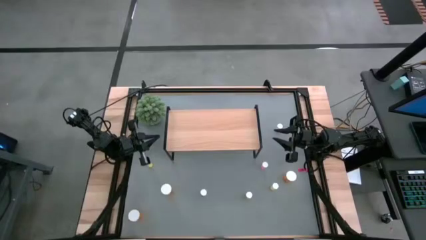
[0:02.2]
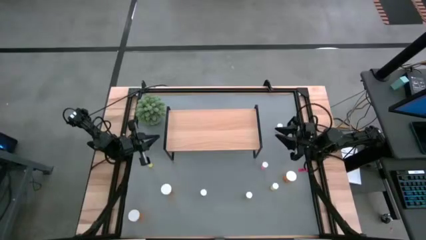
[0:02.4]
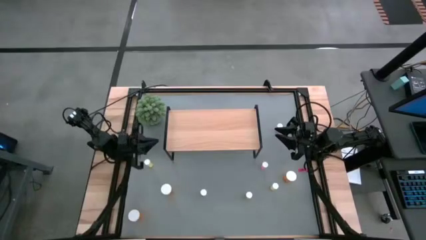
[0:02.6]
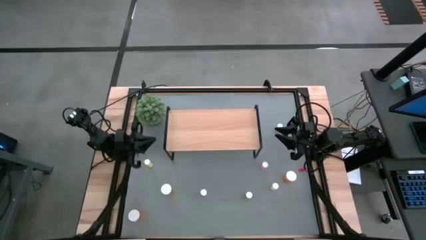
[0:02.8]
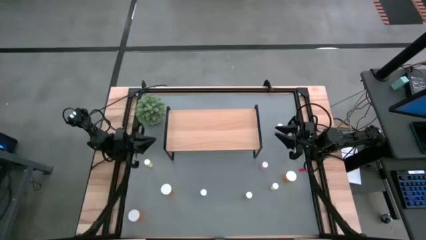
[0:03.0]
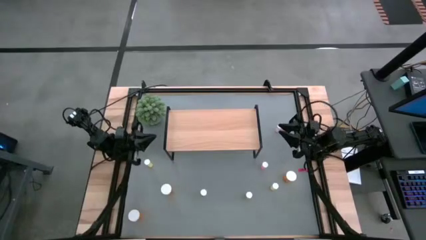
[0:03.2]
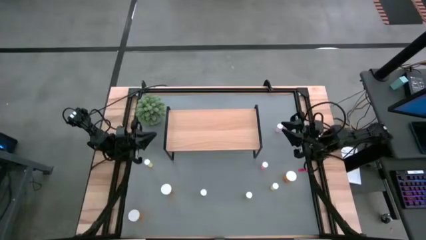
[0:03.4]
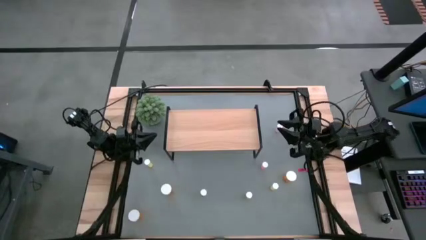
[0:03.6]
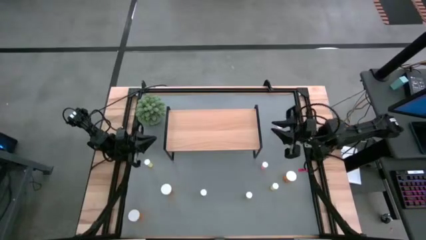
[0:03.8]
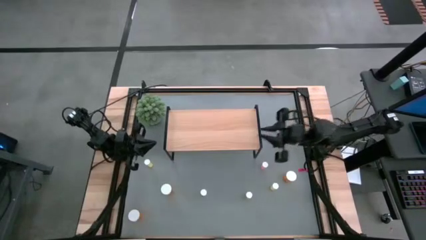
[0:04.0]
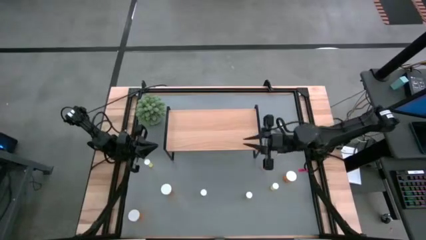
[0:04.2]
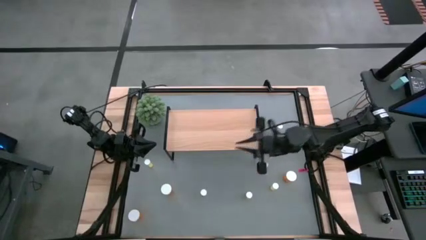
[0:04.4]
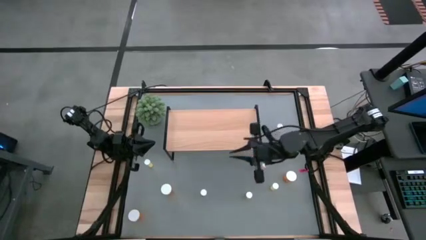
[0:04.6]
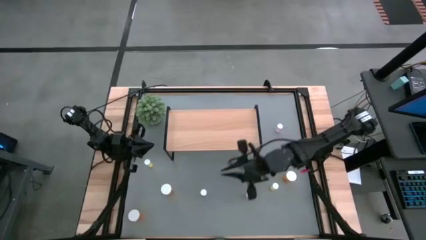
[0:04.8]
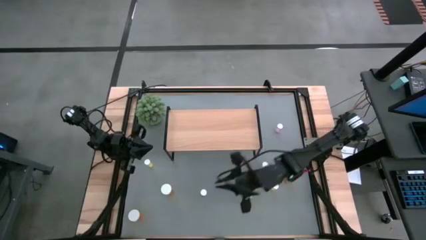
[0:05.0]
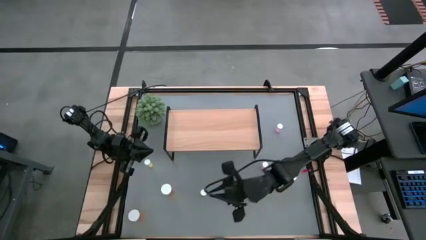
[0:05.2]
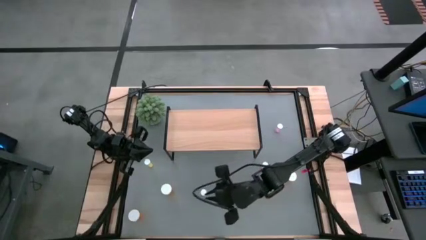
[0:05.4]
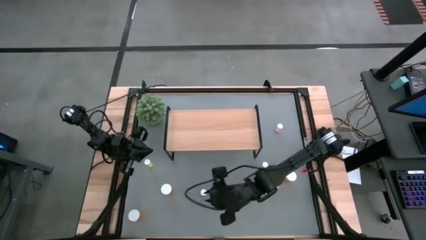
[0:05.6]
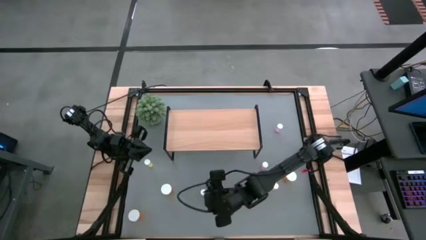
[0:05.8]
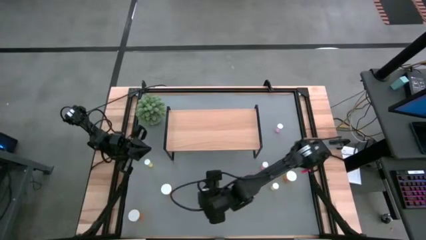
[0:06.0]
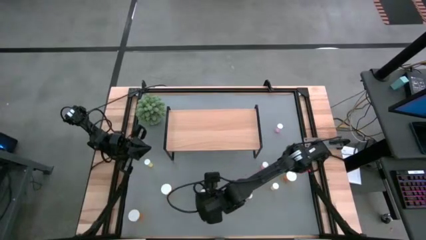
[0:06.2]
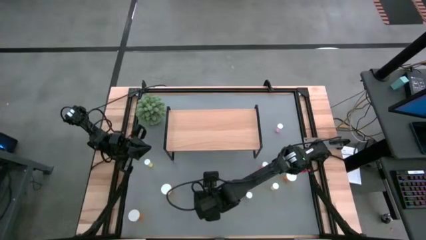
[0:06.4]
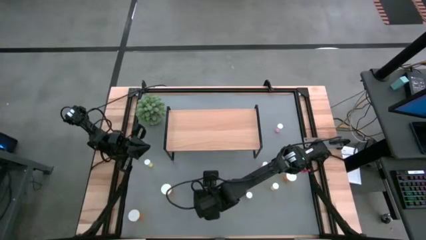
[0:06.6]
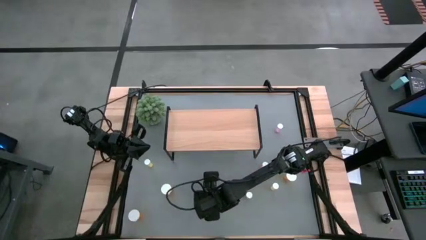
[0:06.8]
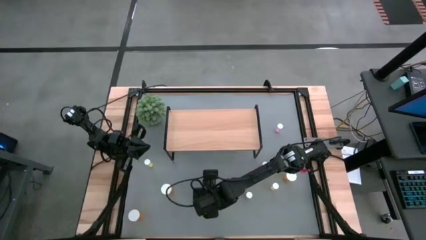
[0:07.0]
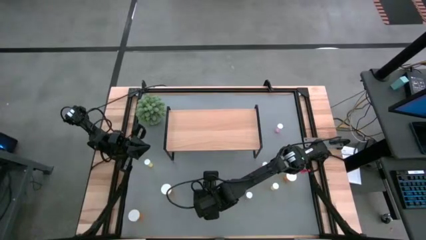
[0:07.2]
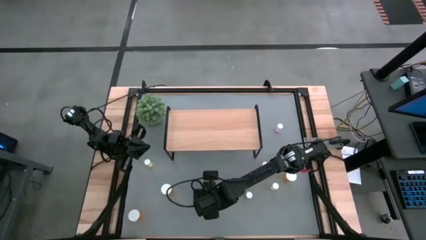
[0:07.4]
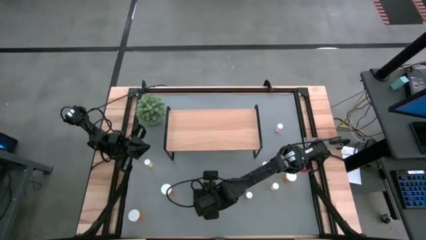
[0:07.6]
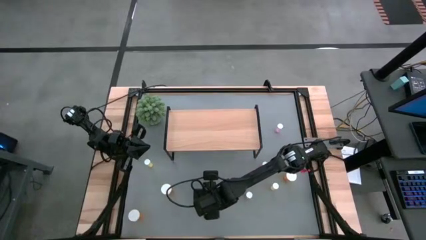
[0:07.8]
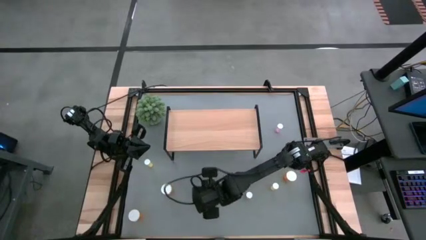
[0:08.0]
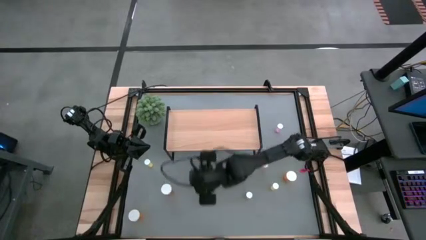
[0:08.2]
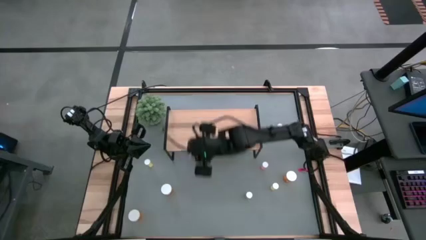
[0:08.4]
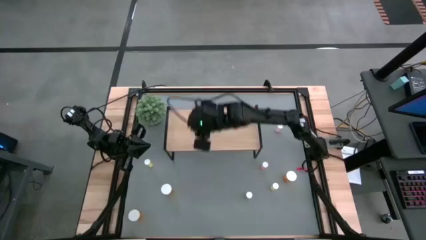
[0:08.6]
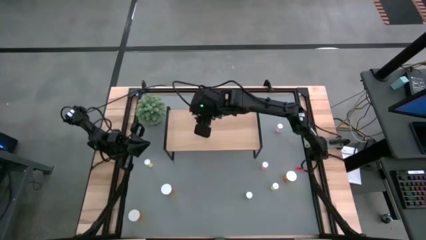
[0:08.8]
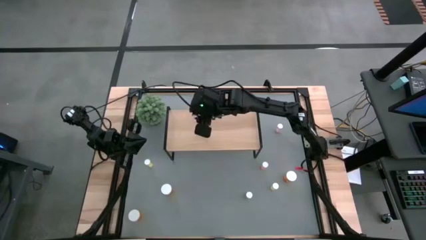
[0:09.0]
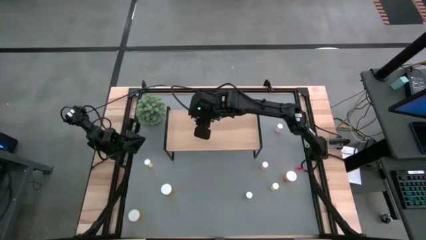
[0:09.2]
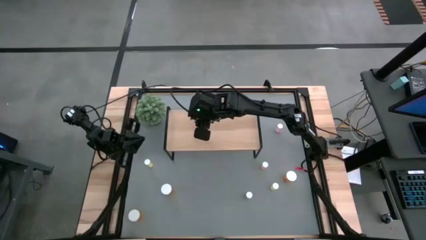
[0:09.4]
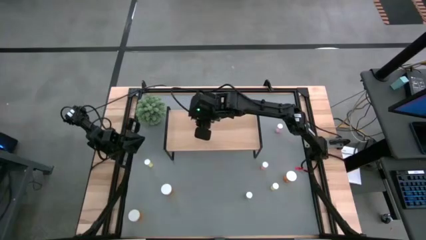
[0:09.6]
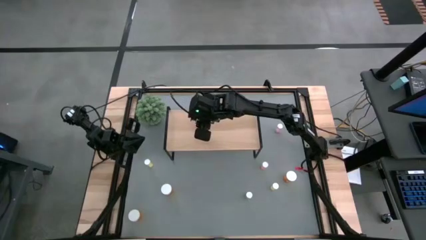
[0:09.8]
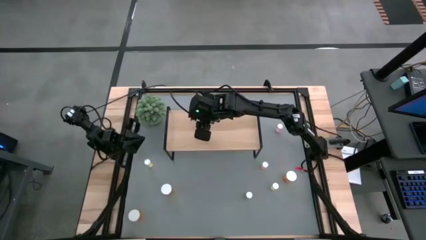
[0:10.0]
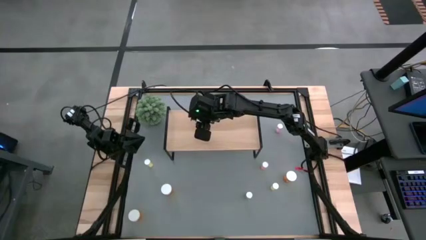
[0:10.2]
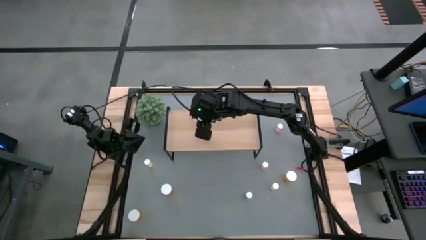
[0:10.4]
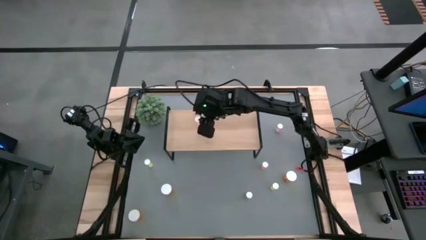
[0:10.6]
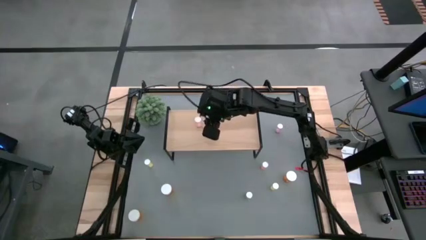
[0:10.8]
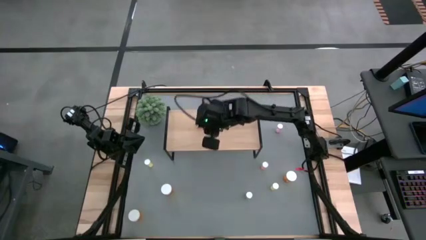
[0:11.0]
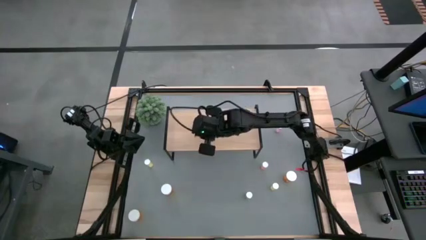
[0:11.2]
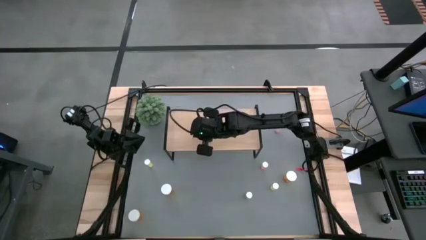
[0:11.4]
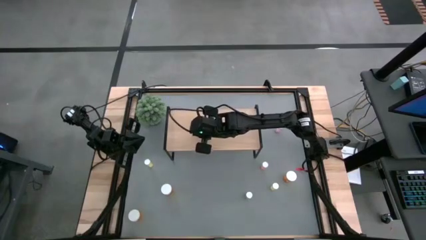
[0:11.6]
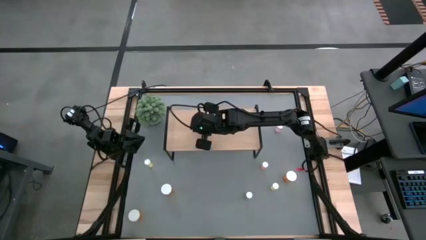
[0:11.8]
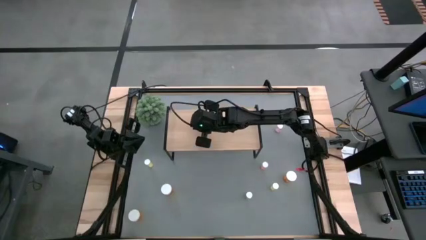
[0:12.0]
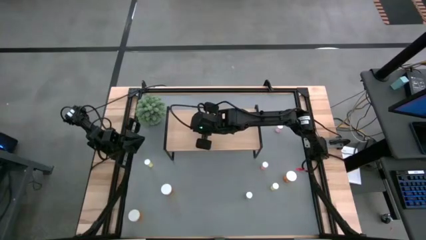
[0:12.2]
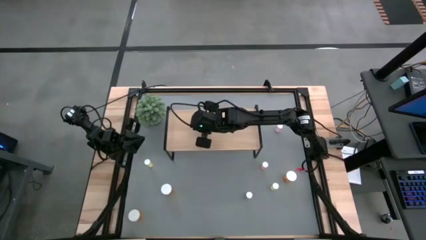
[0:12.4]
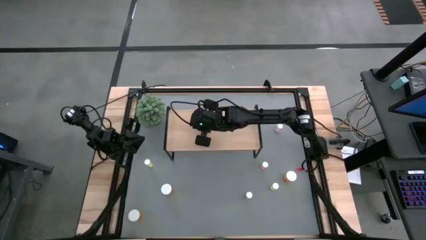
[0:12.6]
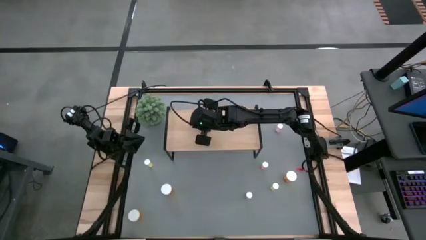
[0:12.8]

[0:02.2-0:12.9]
Task: Pick and place medicine bottles onto shelf by color
Put the bottom purple pill bottle on the shelf

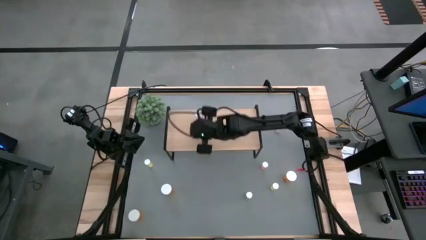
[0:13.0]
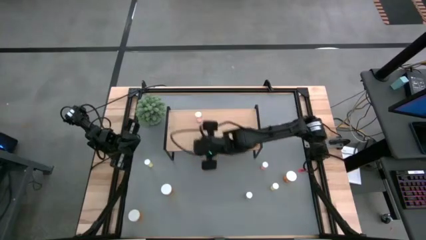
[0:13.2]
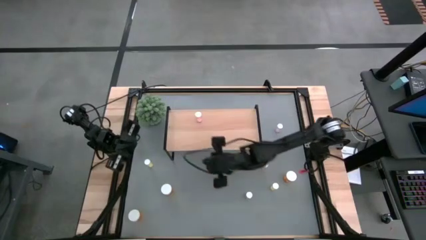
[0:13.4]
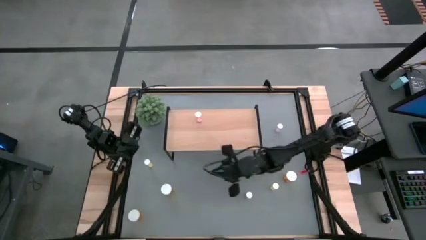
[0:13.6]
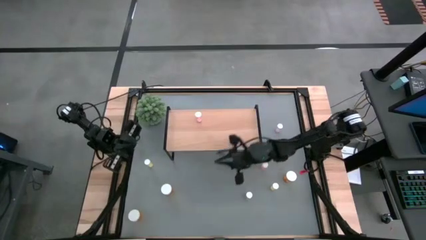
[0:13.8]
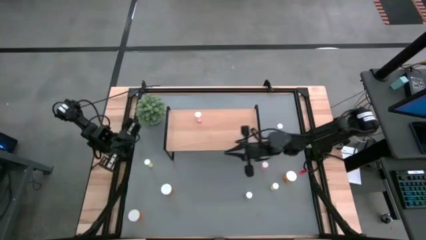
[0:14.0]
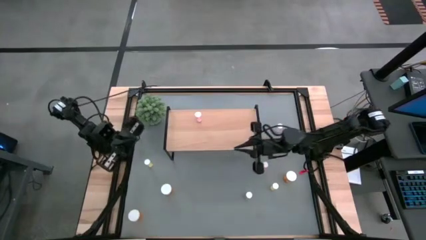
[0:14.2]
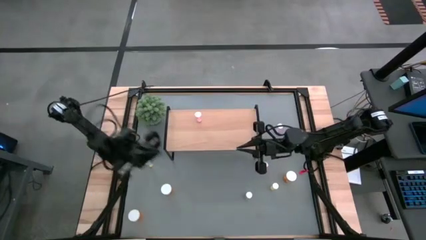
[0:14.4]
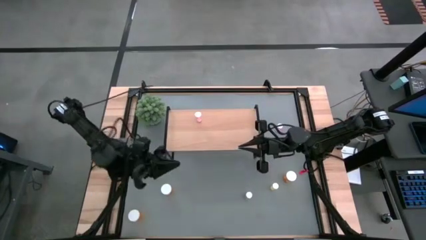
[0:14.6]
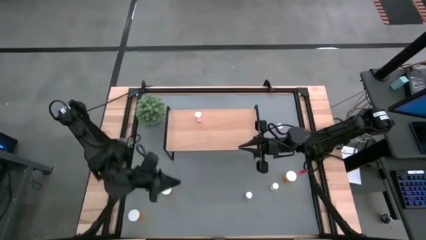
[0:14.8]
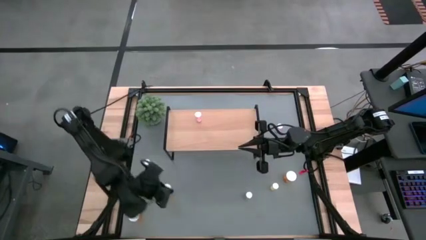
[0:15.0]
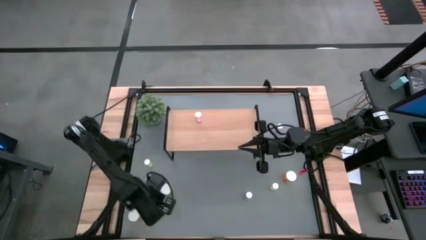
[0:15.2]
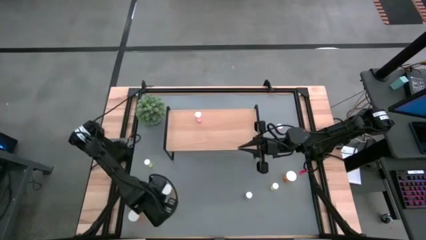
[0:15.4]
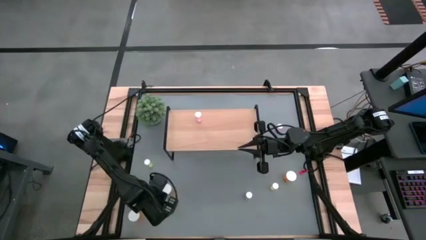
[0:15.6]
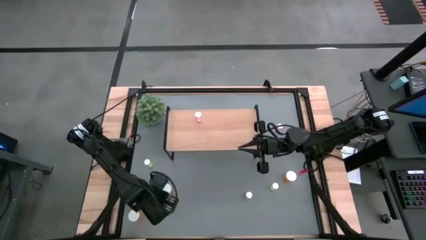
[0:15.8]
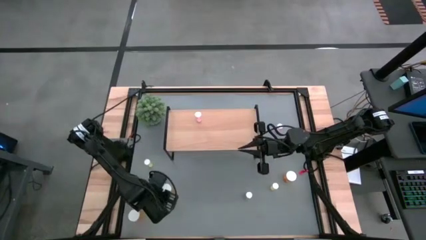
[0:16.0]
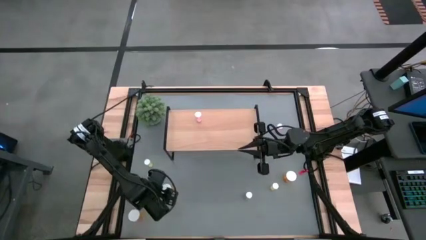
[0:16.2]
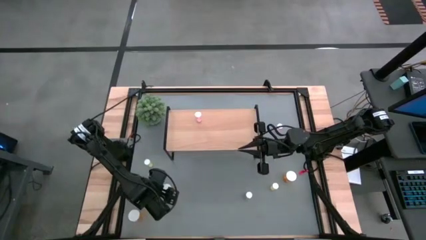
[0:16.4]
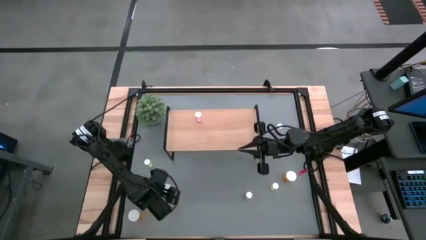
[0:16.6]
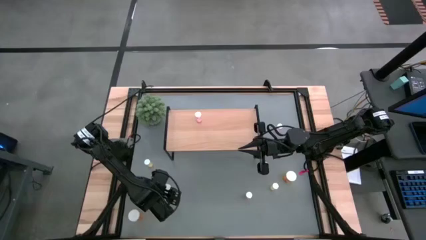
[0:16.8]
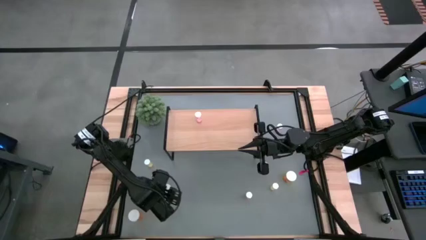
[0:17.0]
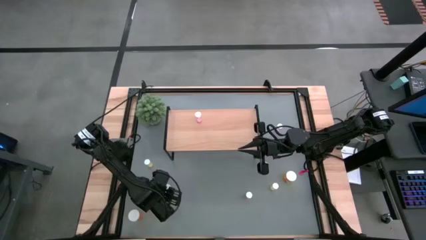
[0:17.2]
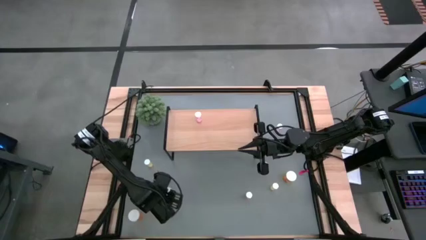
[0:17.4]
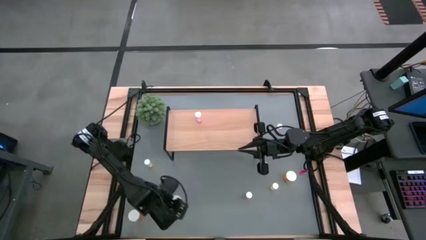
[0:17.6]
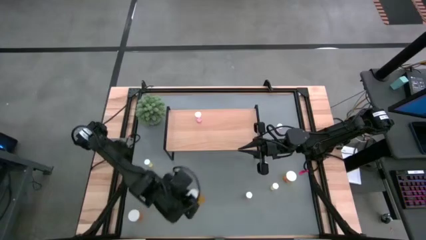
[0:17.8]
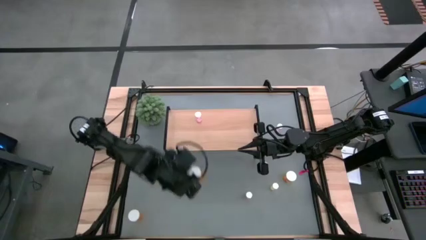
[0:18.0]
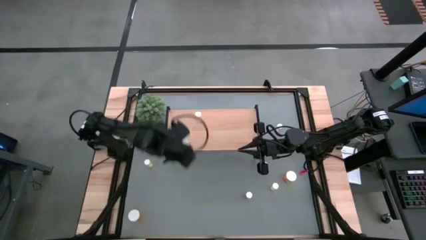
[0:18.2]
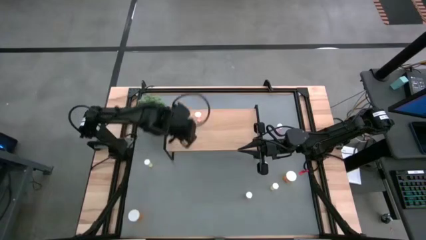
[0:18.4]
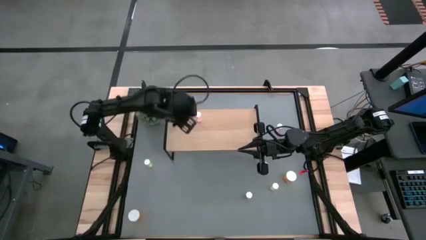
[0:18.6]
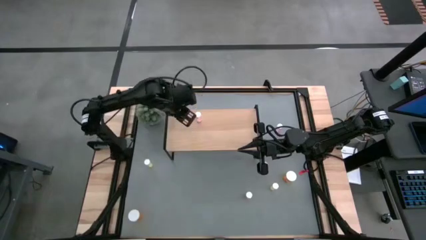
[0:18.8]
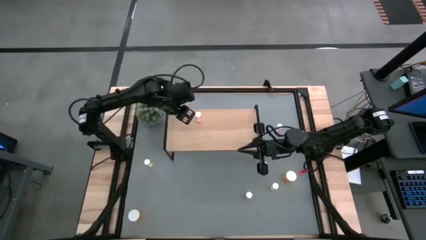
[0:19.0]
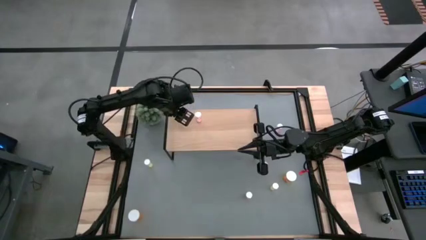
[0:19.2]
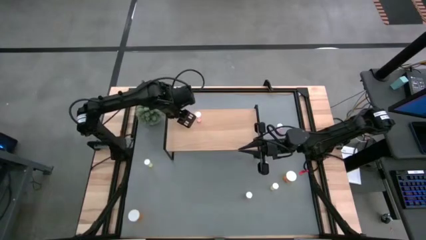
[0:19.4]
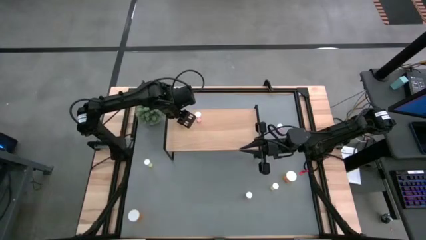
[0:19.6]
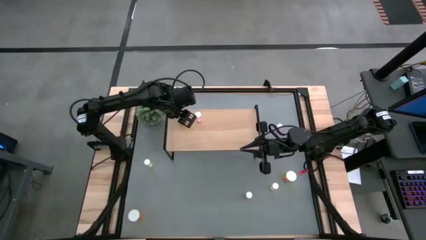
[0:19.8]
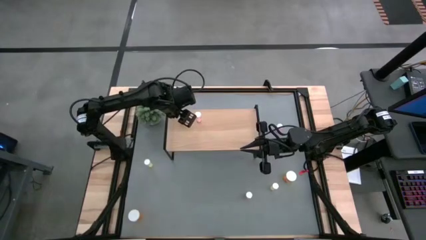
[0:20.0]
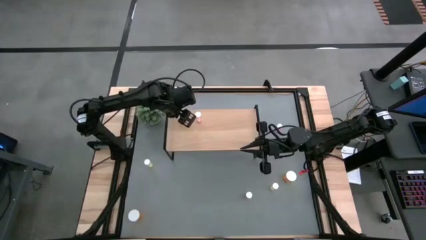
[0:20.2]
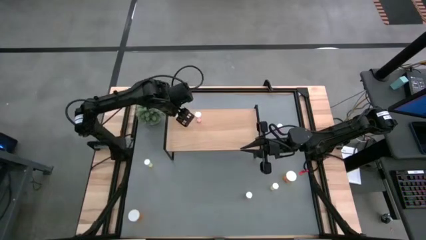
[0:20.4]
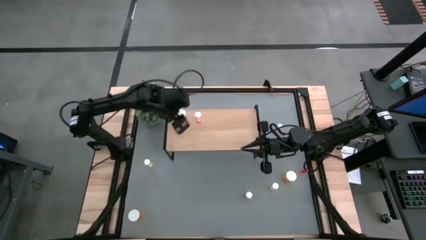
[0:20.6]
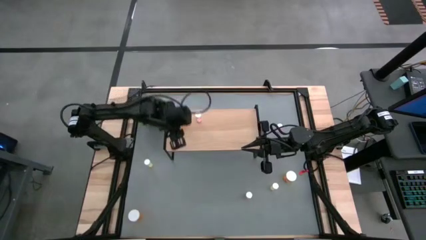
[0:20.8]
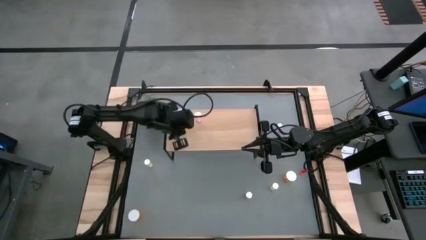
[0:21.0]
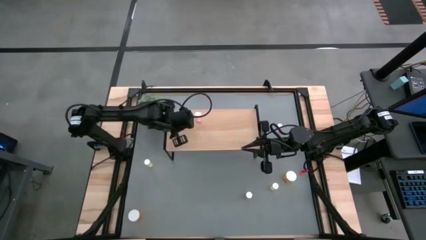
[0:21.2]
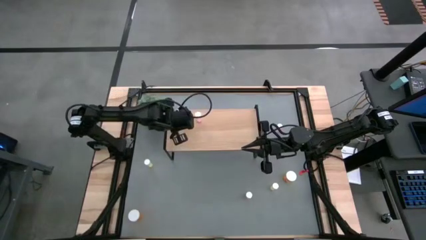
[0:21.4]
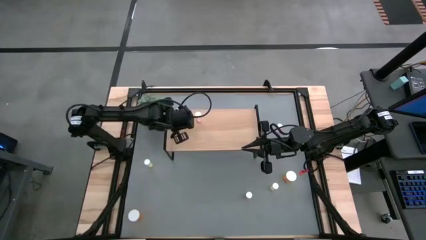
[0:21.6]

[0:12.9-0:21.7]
Put the top left orange pill bottle on the shelf
